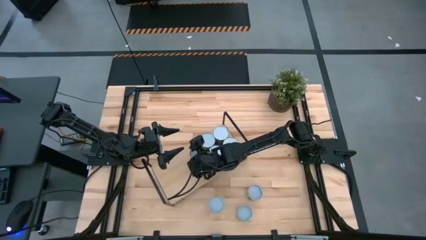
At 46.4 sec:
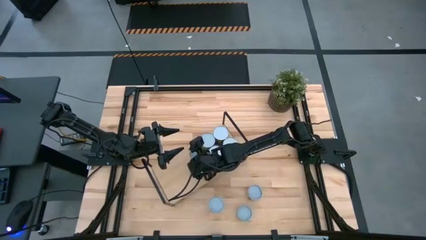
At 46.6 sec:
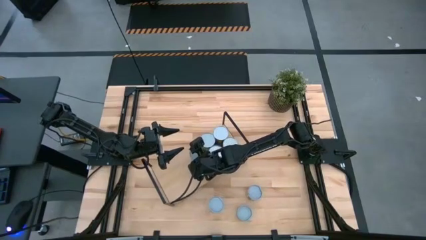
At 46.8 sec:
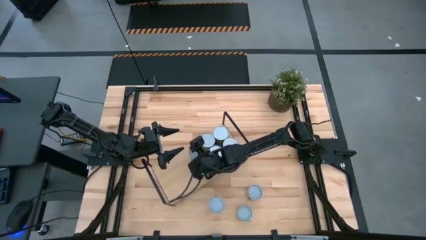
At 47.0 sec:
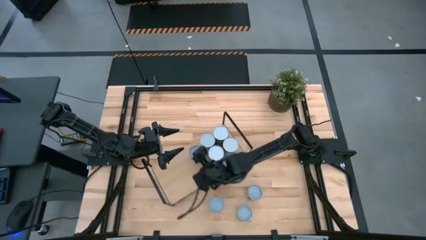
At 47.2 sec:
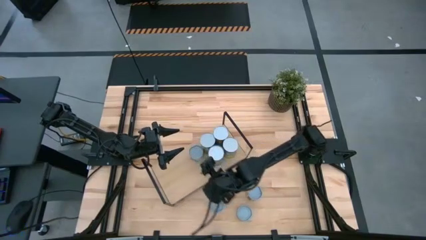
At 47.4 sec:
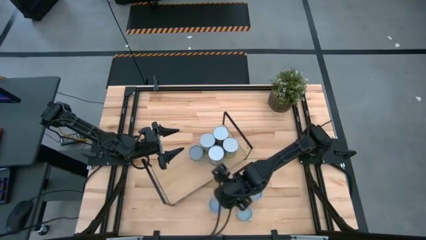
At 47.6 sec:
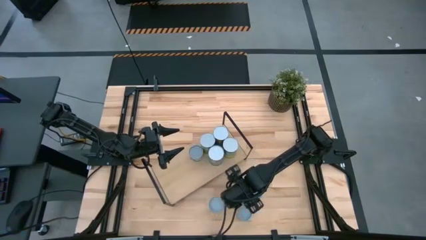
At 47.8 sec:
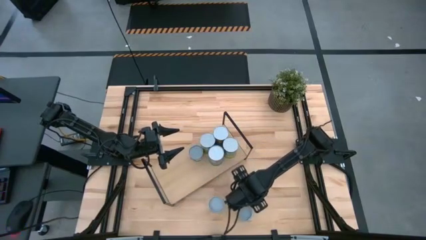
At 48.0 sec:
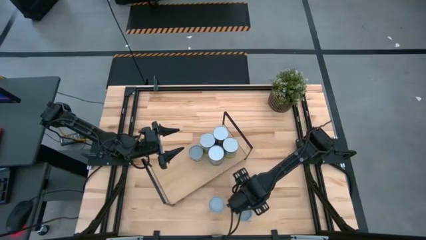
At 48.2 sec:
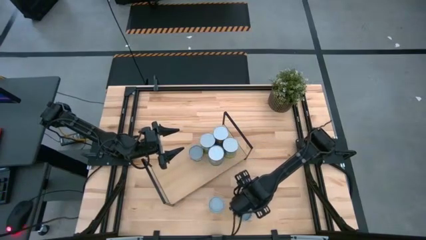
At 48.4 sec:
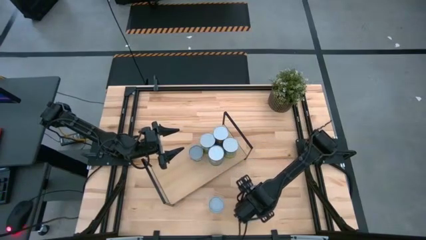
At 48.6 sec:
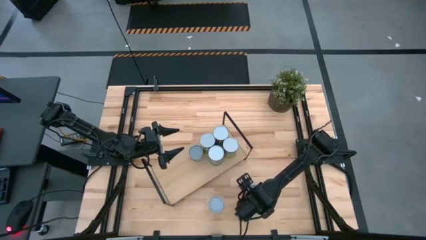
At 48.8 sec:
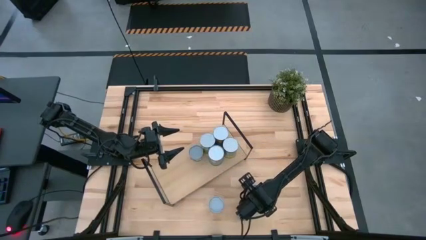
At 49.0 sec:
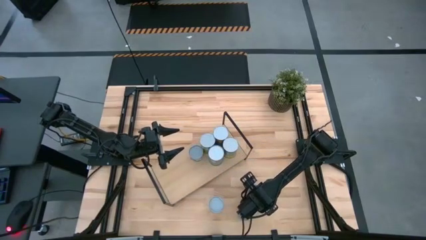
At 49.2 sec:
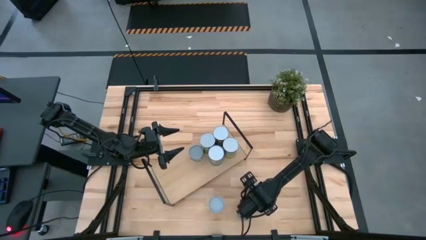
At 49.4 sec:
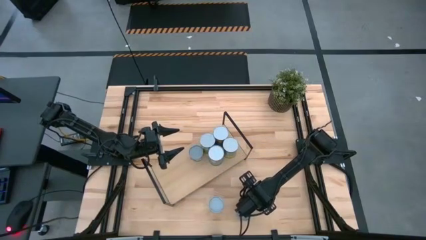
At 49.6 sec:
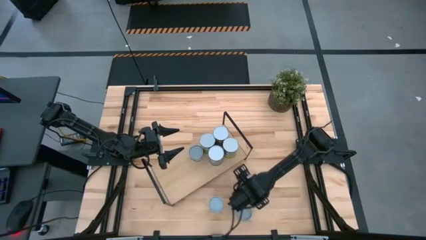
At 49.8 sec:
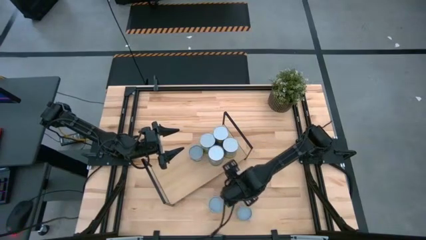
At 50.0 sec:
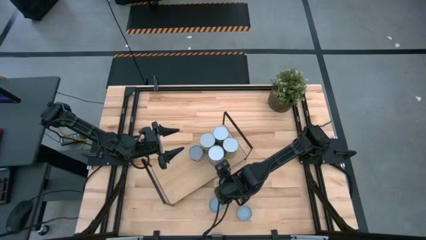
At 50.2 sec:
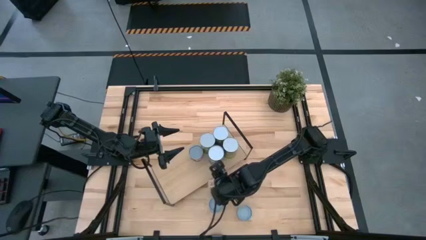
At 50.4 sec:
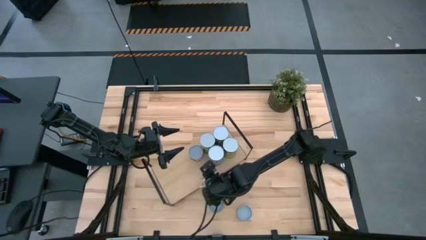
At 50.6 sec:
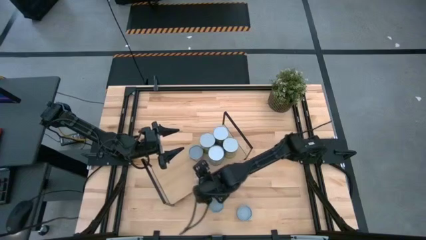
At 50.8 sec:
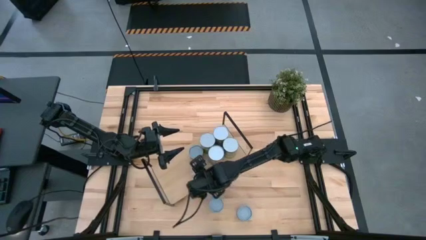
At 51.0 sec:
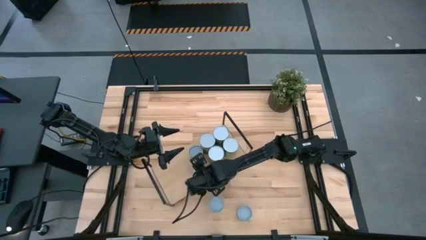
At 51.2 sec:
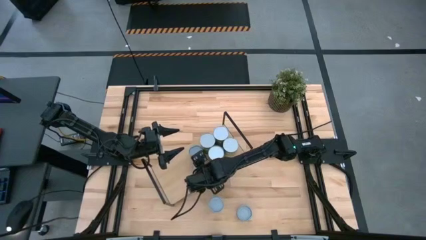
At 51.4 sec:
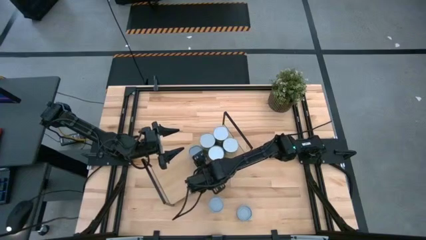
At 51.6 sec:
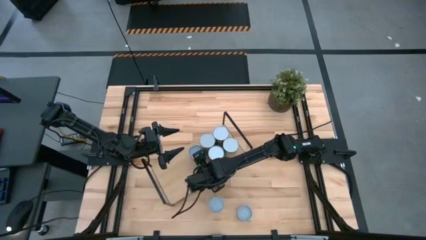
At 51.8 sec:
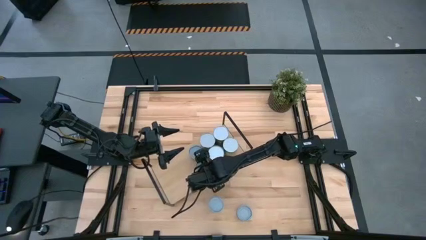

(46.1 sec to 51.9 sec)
Task: Pick and place cans onto a shelf
Put the small canned tomato on the shelf

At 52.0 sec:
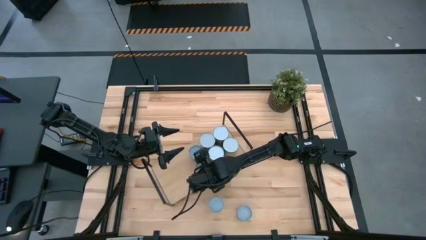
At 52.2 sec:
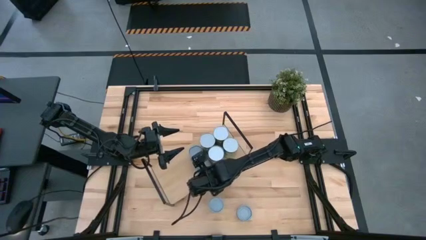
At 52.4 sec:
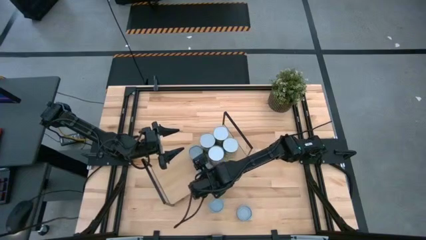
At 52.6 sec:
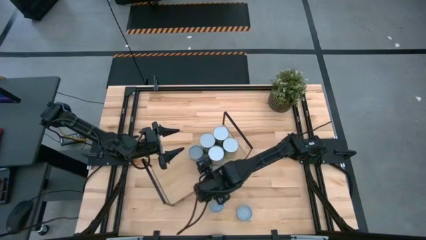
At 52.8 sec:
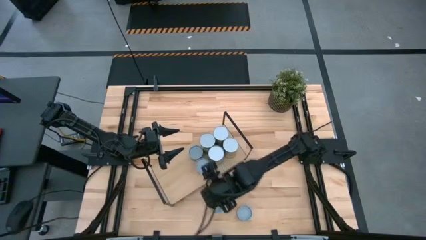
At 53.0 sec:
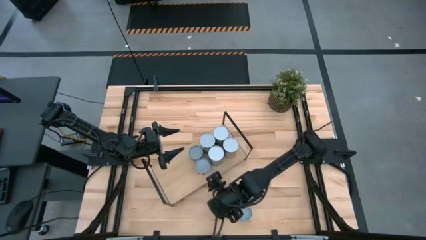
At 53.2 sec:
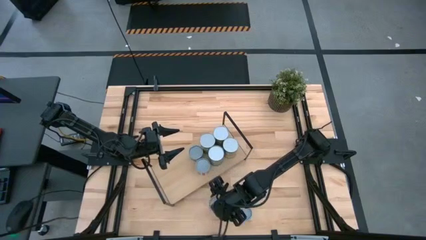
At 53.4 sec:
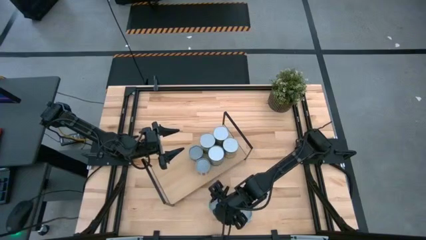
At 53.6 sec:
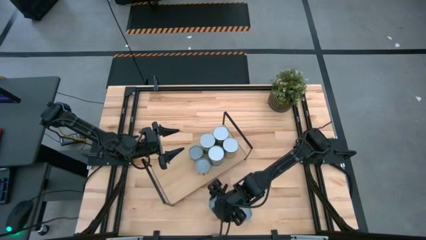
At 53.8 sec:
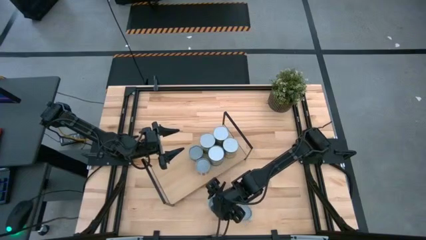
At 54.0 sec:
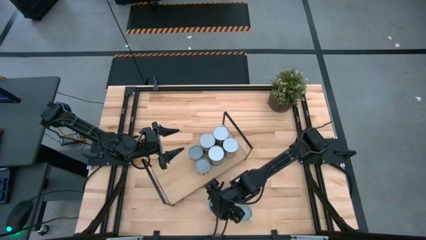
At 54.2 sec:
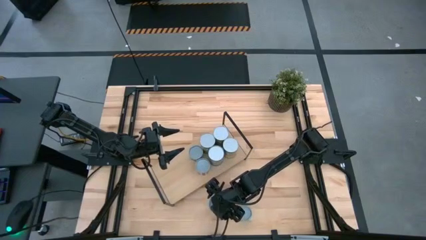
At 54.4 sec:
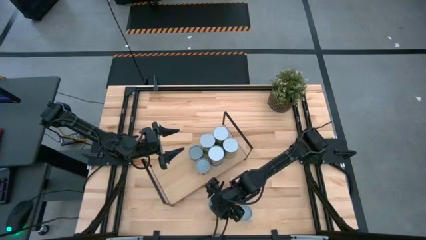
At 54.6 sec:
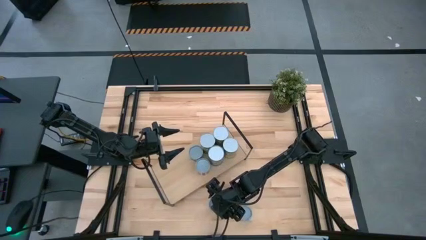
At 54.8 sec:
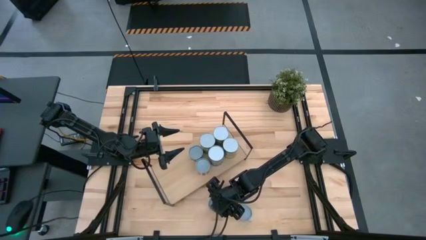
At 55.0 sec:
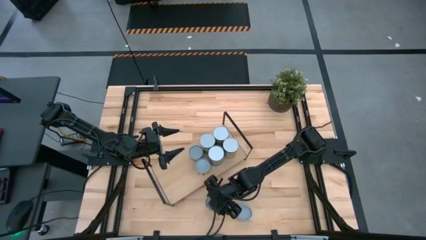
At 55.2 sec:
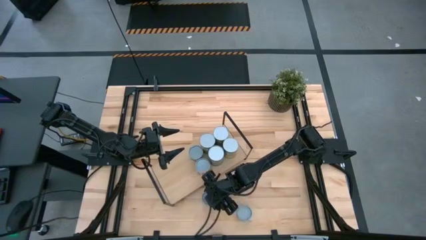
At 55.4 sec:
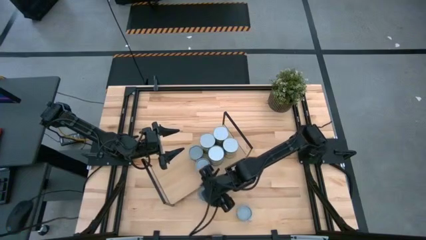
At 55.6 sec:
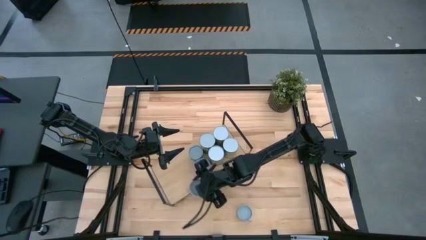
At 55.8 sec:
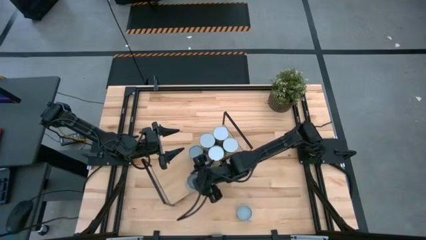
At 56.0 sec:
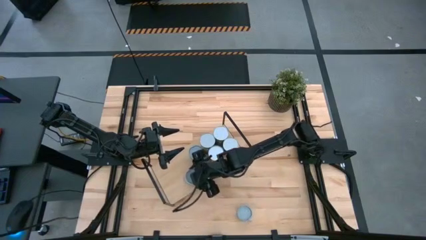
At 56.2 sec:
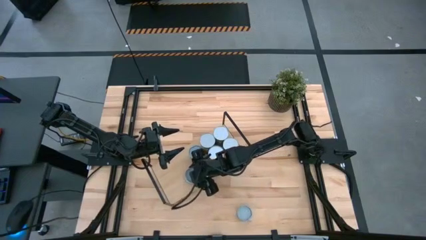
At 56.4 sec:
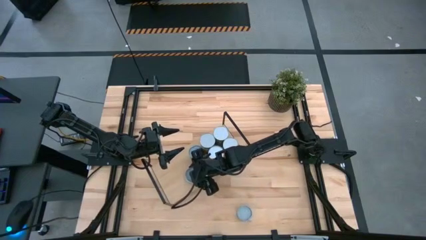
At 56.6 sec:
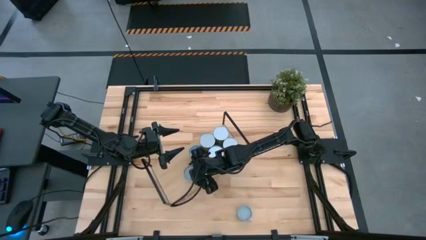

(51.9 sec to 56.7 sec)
Put the small canned mixed vegetables on the shelf

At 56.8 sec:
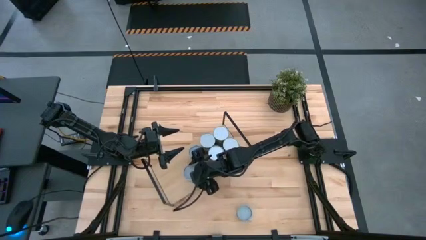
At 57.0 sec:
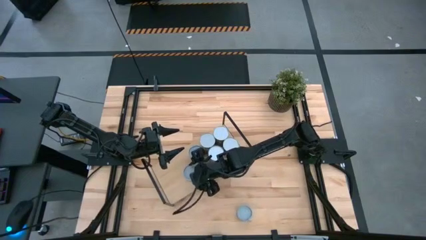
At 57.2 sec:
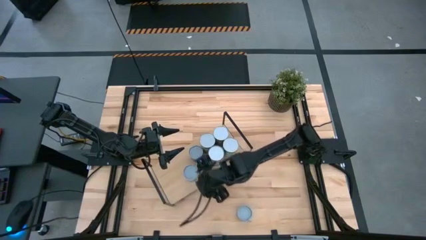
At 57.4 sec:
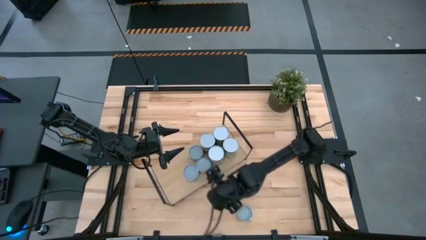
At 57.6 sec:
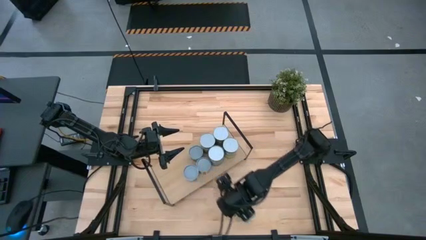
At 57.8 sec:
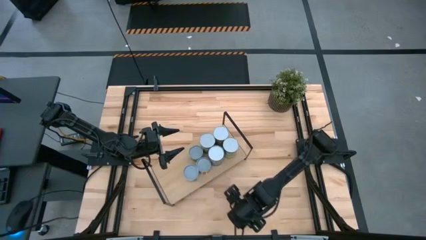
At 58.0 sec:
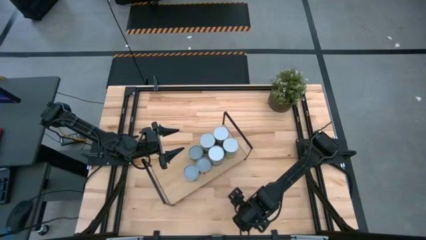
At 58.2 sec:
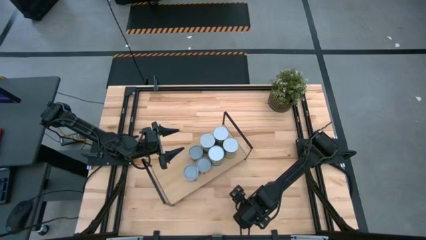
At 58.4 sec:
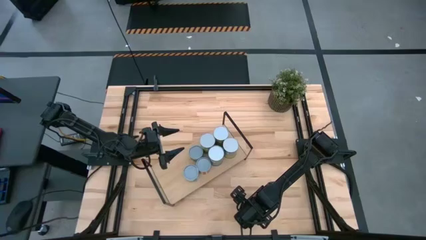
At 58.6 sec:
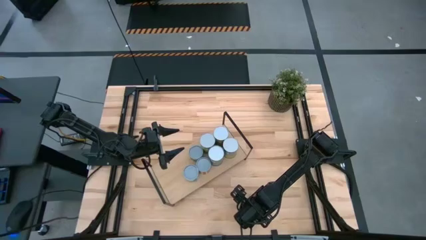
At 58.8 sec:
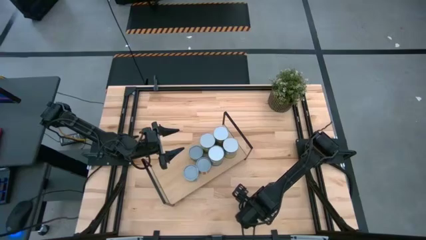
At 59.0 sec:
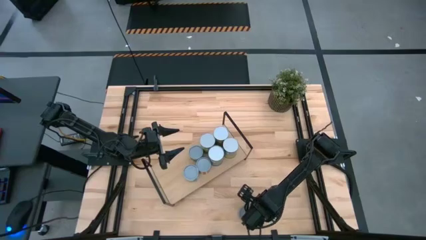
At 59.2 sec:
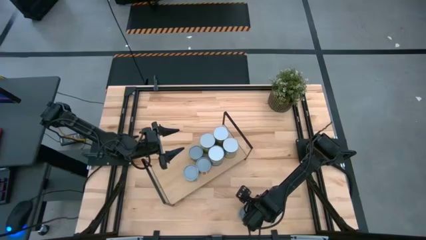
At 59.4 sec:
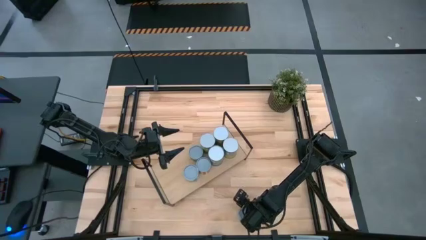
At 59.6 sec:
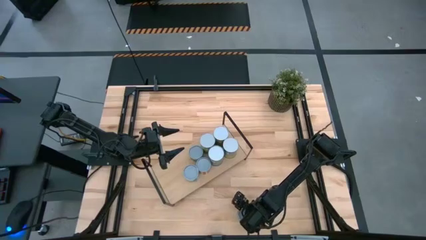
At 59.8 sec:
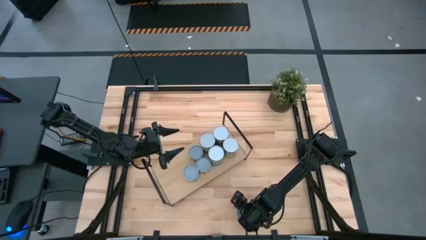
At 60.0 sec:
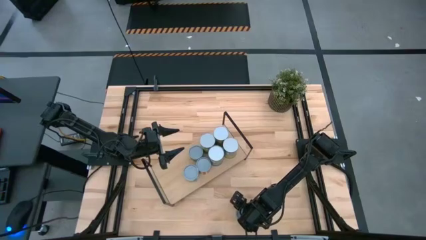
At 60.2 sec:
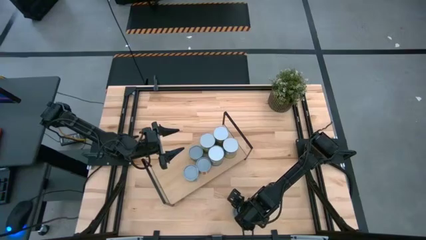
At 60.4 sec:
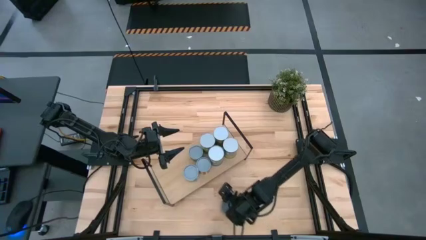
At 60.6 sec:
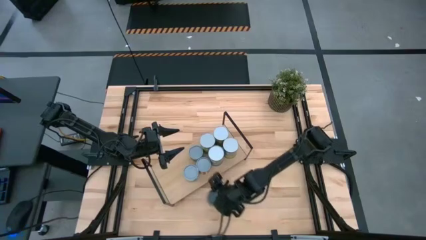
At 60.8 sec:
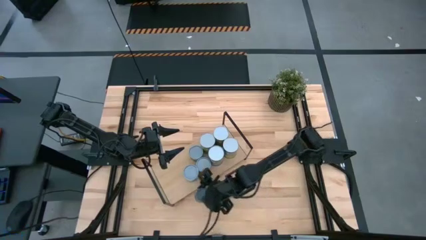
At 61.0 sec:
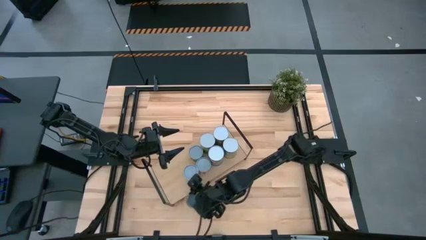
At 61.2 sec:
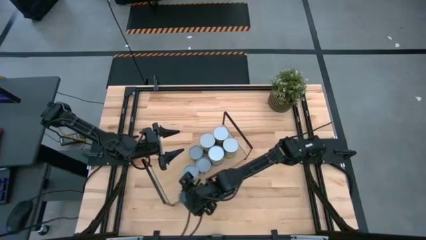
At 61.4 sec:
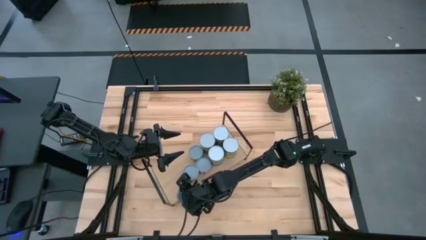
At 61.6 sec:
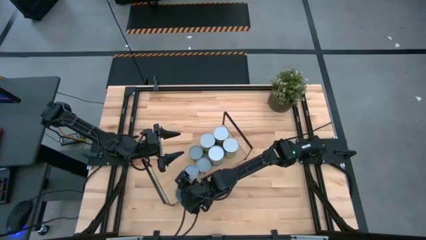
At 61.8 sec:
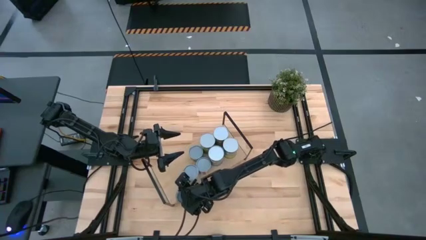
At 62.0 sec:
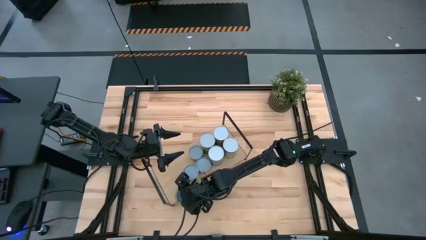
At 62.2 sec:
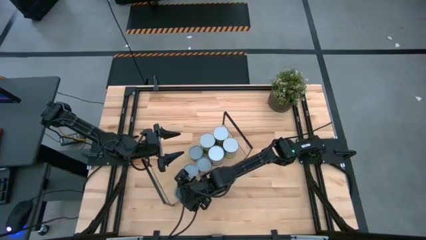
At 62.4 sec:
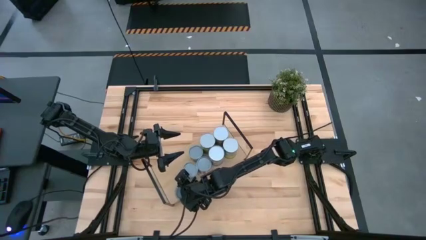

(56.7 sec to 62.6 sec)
Put the small canned tuna on the shelf
